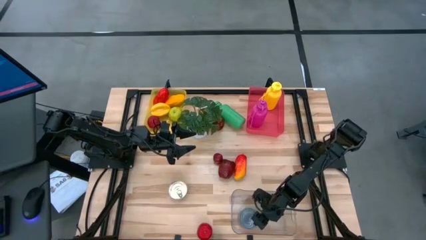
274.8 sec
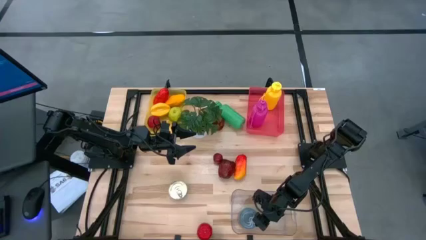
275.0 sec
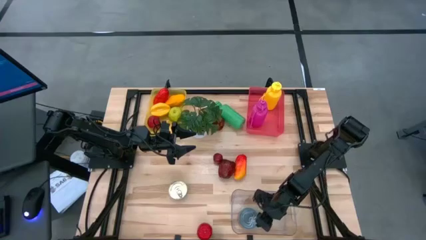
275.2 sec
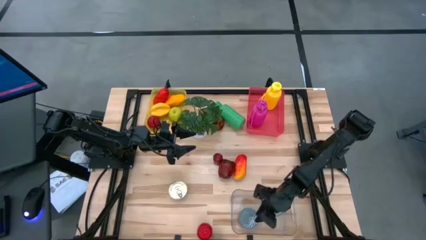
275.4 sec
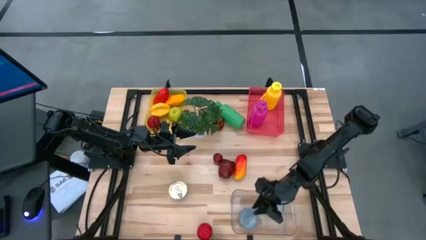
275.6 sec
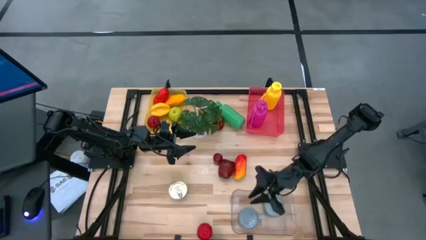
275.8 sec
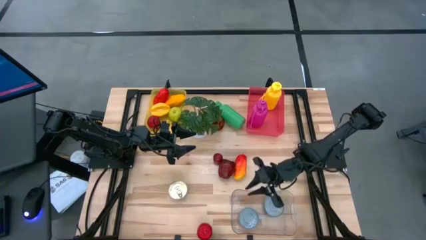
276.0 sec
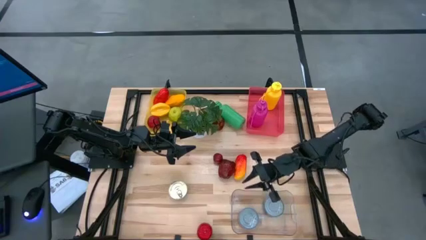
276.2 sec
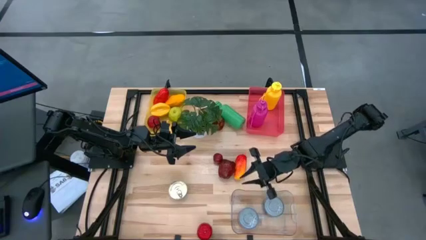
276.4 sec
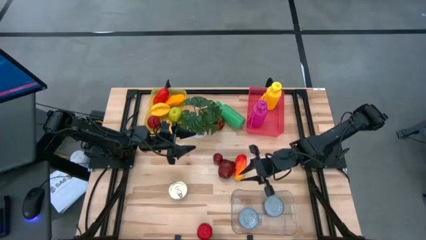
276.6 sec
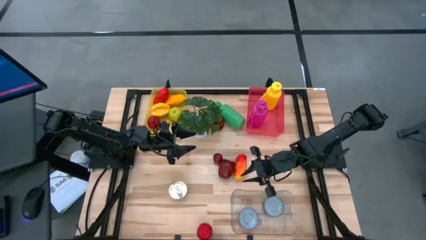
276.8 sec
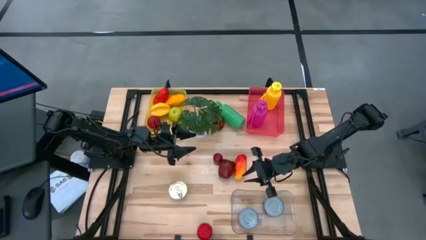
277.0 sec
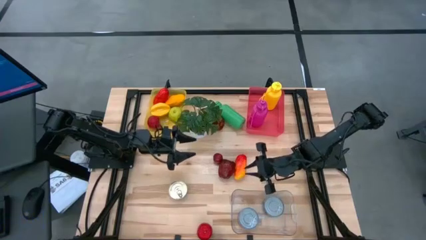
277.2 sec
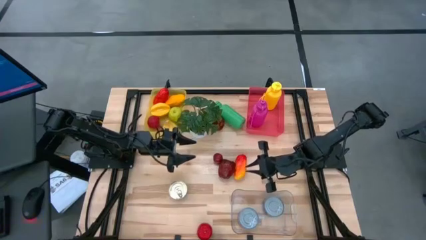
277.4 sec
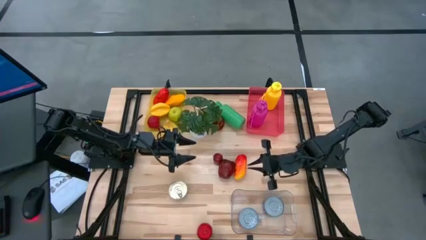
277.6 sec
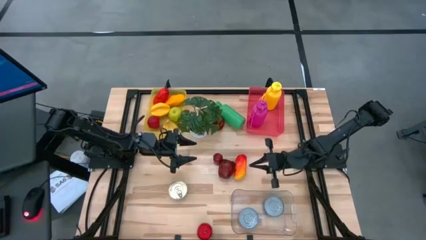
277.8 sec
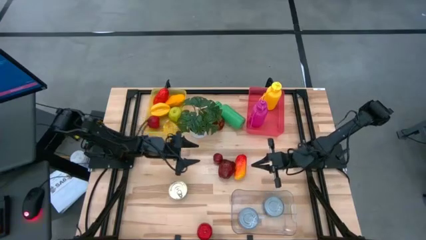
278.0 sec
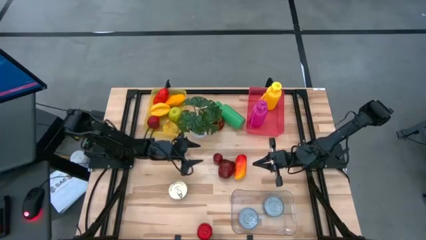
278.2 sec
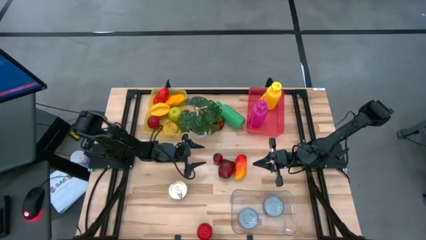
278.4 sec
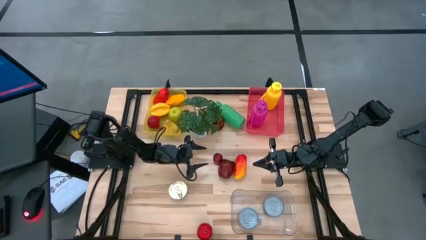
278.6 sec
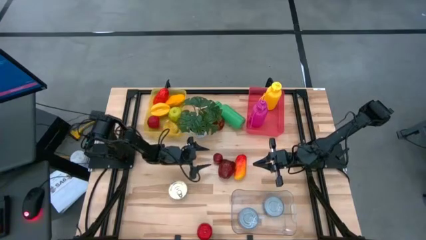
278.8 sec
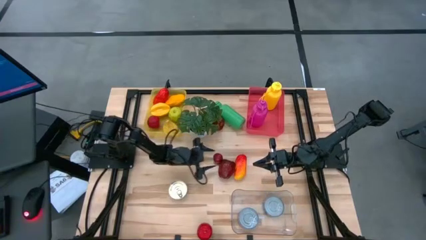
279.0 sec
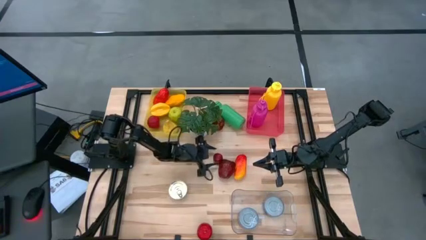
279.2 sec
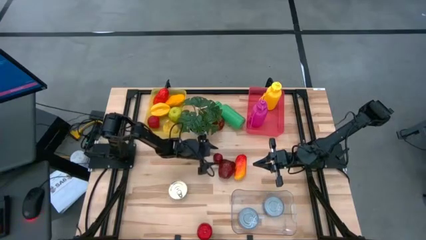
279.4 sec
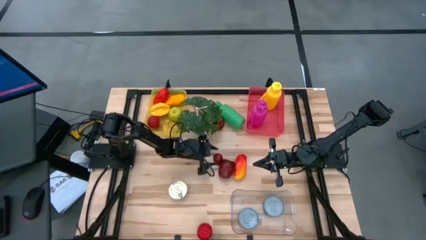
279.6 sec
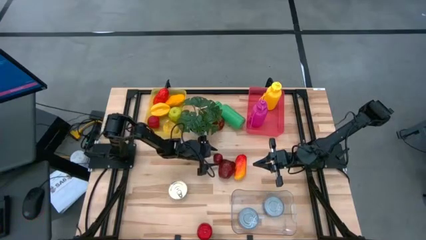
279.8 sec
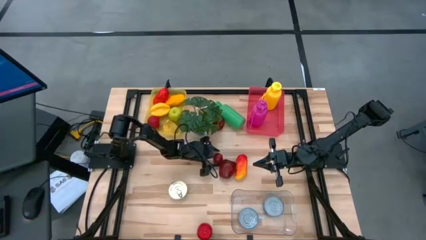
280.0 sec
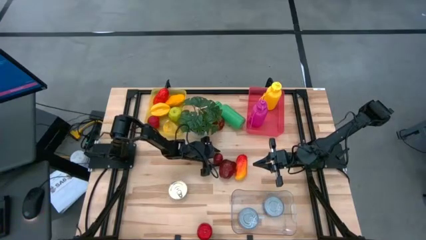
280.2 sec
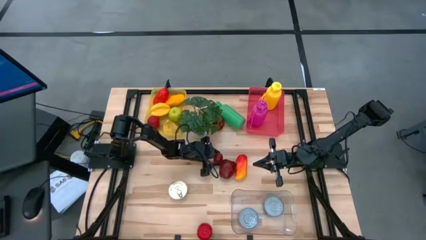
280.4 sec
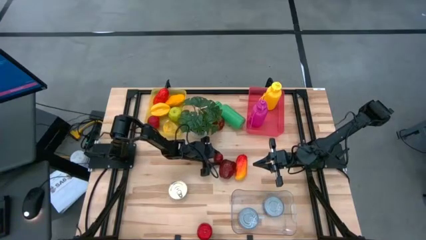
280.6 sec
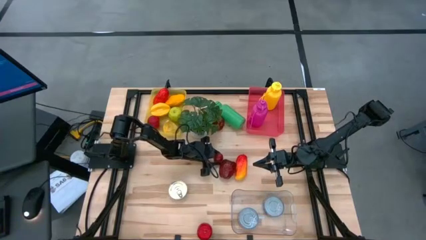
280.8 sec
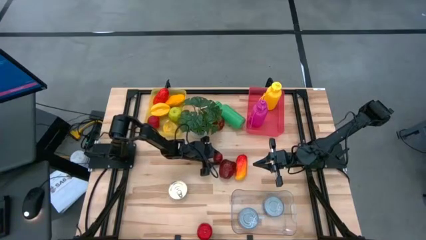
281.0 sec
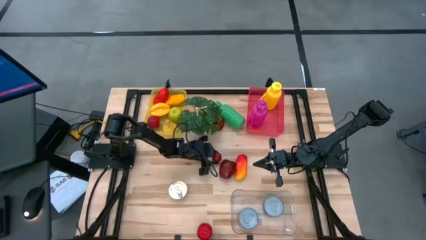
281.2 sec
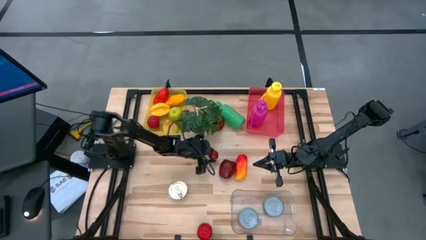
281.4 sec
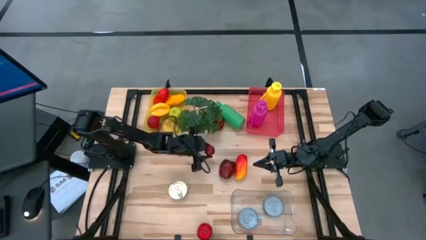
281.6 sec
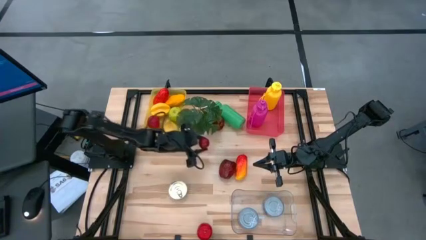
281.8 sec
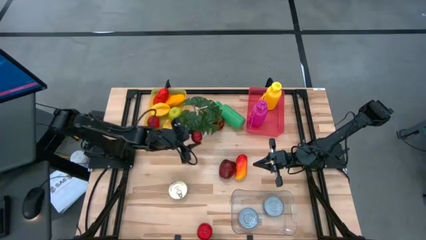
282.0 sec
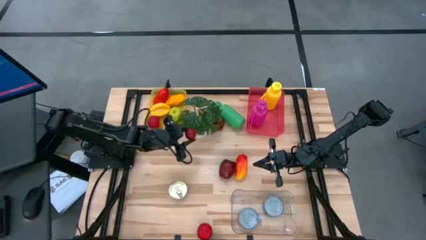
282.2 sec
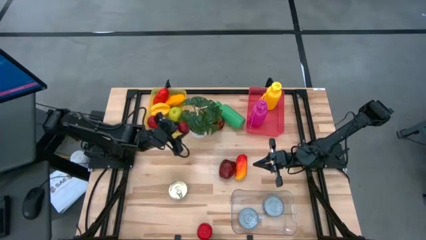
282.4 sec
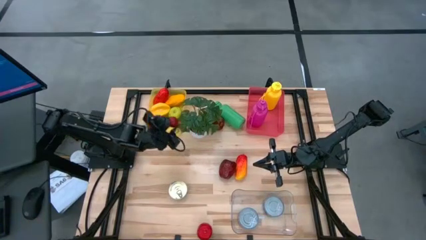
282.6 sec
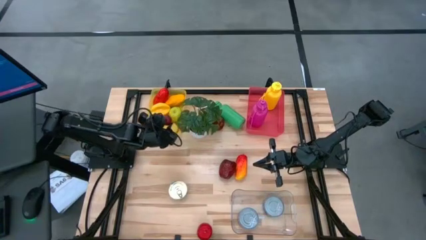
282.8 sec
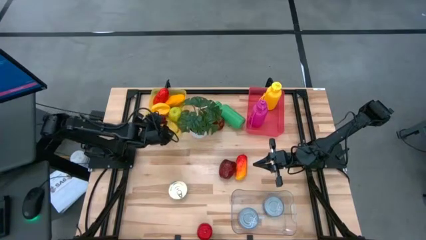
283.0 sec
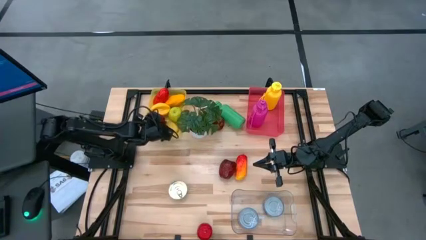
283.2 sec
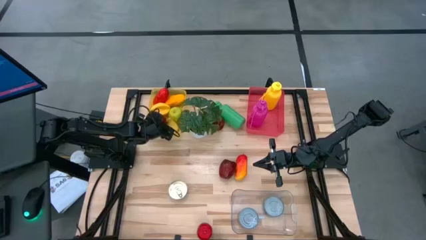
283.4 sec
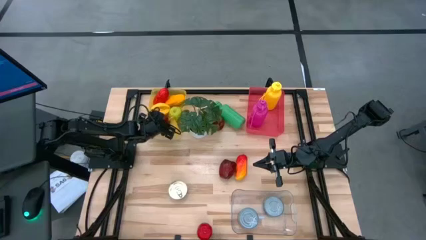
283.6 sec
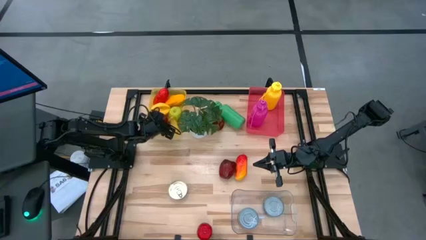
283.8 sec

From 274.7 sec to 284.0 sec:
Task: Pick & Place Food Item
Put the red pomegranate into the yellow bin

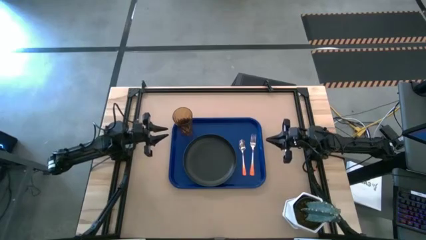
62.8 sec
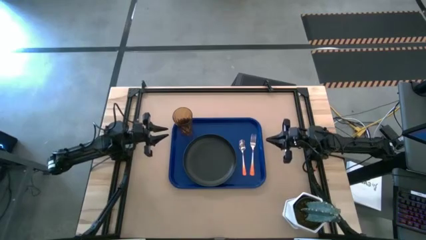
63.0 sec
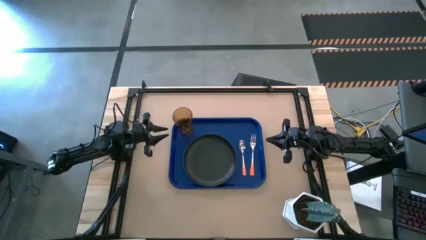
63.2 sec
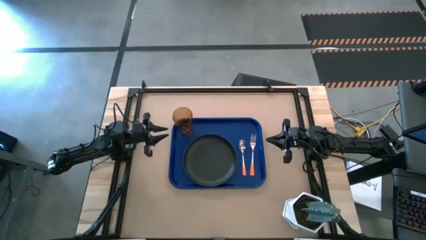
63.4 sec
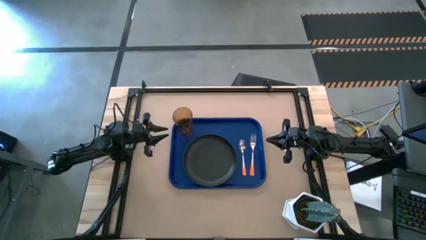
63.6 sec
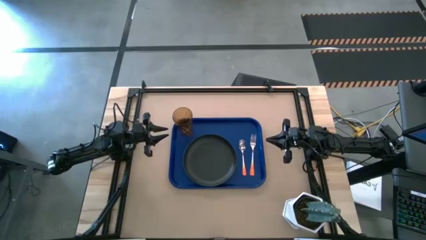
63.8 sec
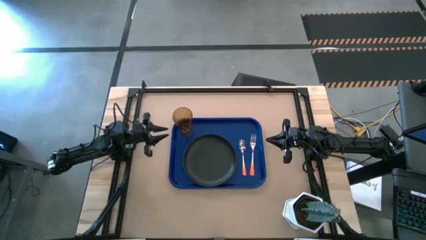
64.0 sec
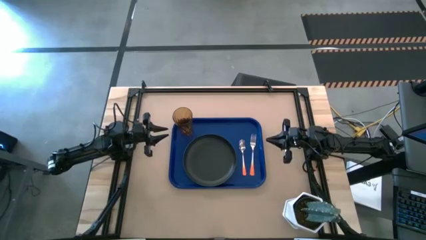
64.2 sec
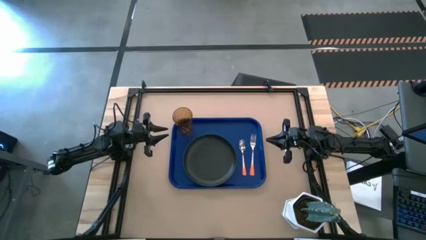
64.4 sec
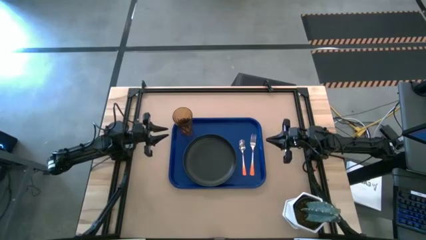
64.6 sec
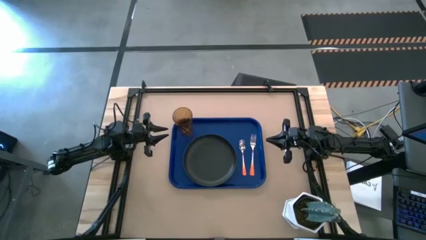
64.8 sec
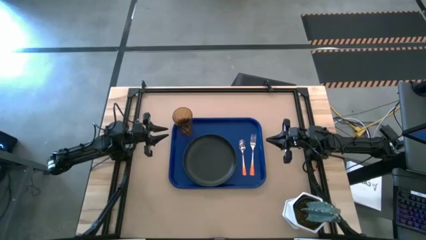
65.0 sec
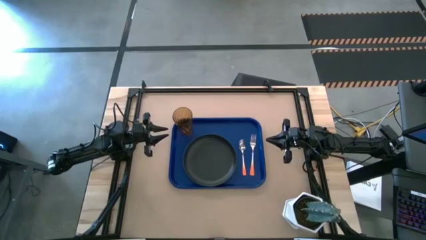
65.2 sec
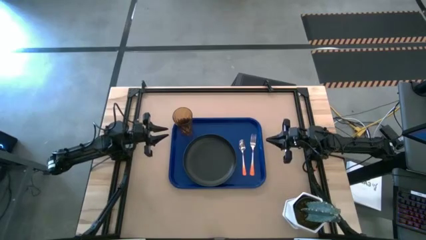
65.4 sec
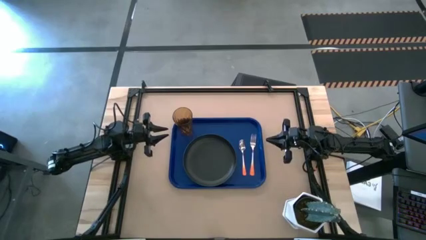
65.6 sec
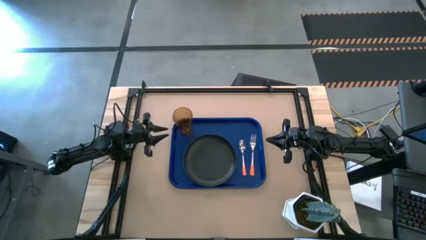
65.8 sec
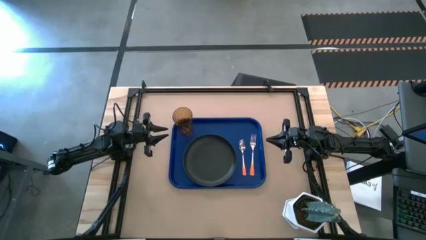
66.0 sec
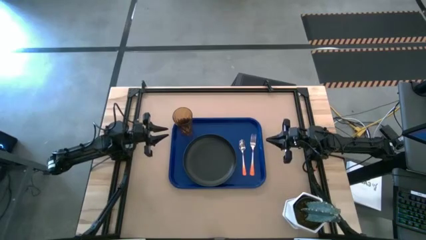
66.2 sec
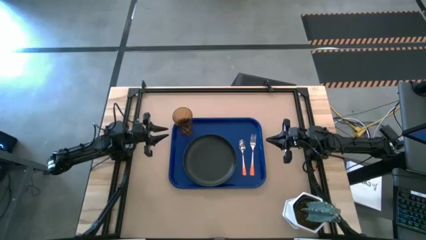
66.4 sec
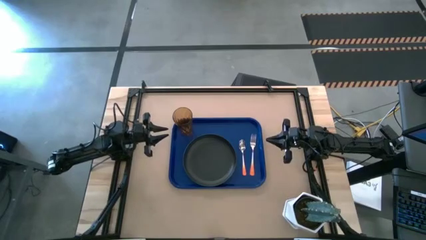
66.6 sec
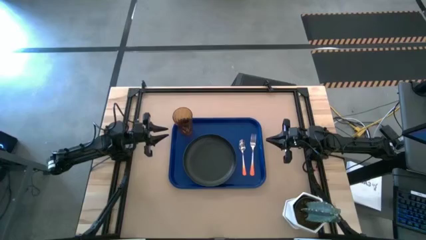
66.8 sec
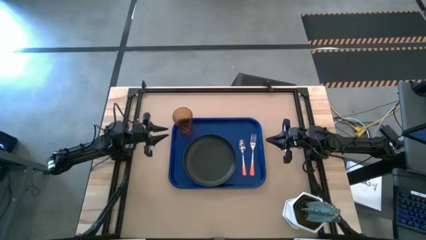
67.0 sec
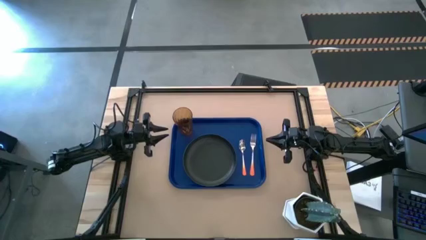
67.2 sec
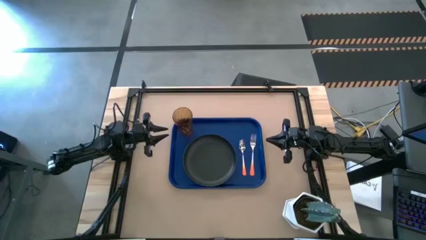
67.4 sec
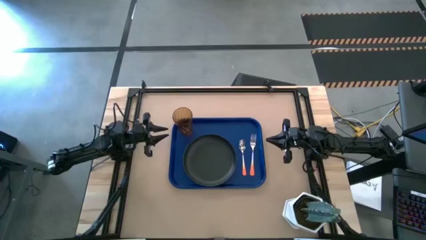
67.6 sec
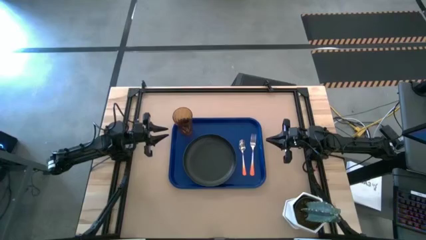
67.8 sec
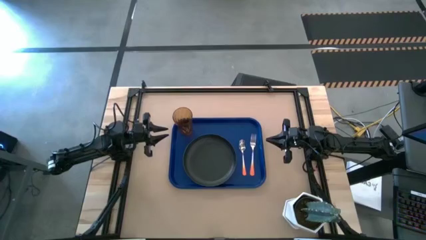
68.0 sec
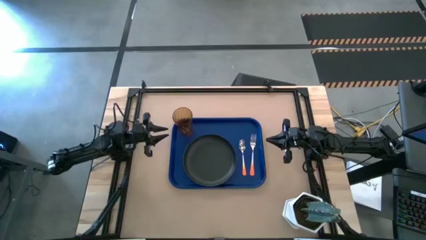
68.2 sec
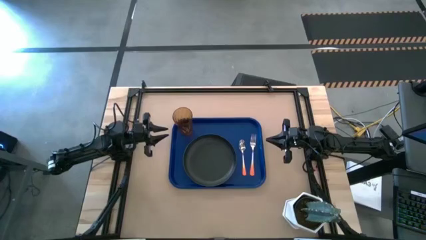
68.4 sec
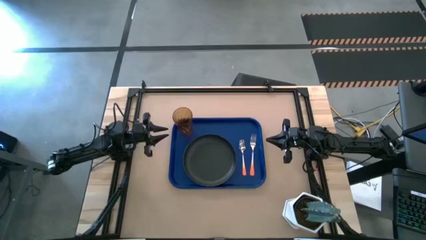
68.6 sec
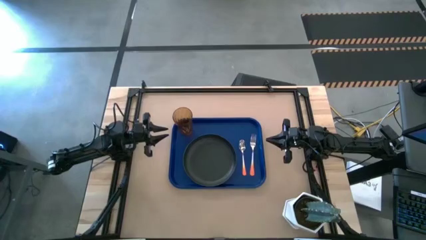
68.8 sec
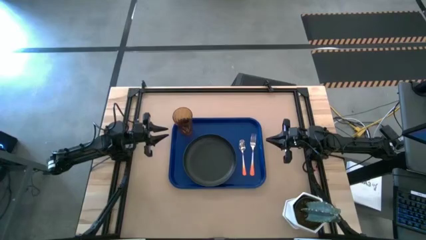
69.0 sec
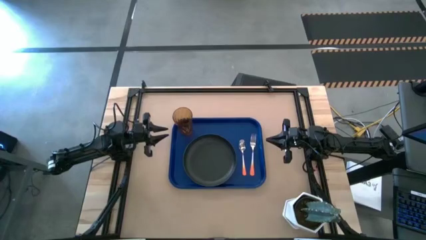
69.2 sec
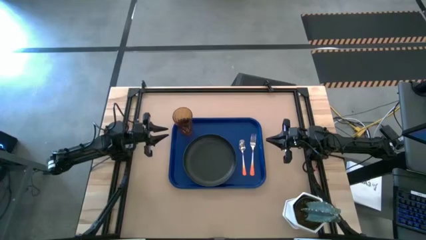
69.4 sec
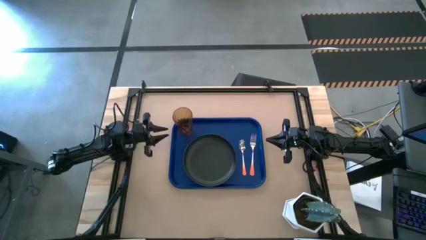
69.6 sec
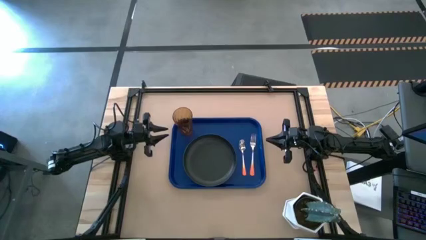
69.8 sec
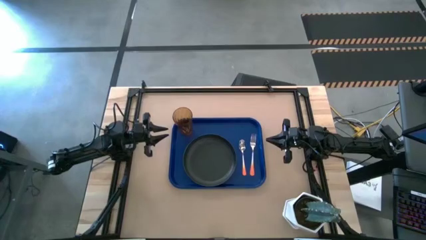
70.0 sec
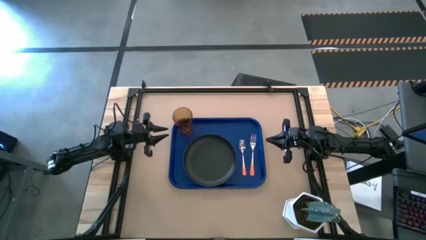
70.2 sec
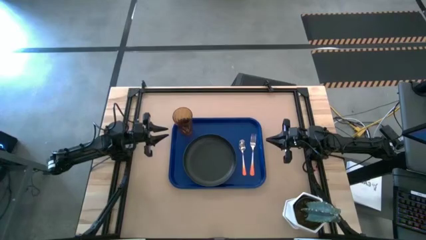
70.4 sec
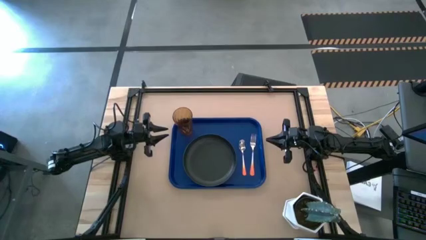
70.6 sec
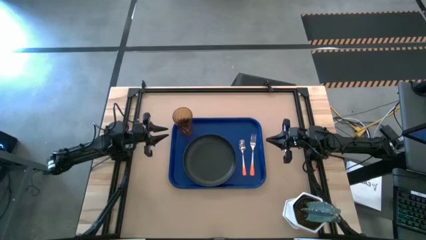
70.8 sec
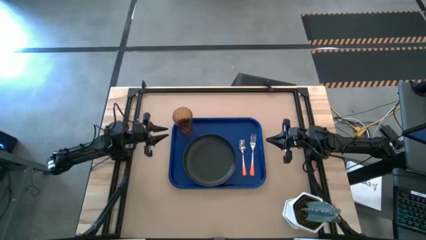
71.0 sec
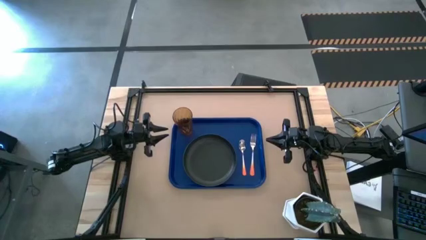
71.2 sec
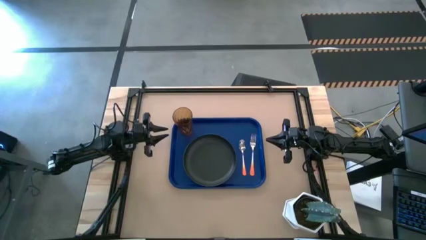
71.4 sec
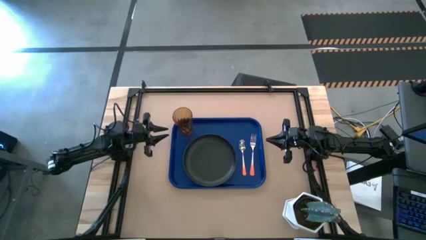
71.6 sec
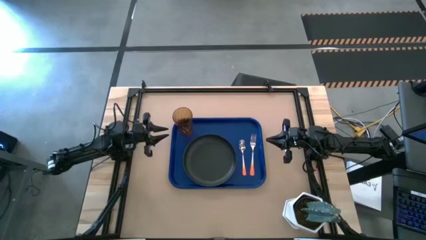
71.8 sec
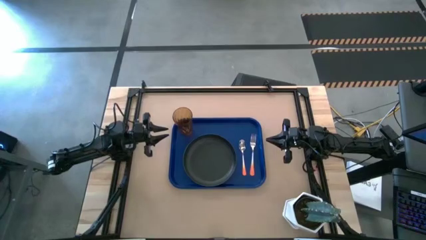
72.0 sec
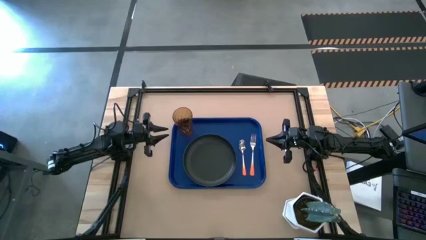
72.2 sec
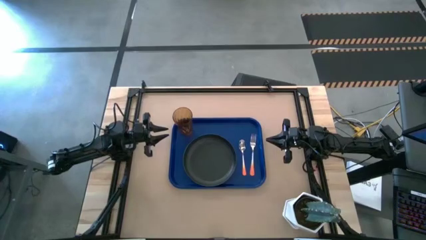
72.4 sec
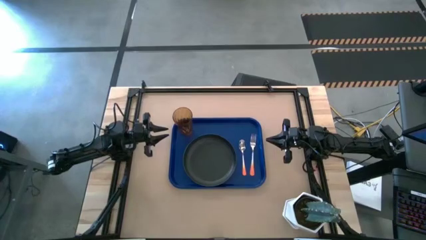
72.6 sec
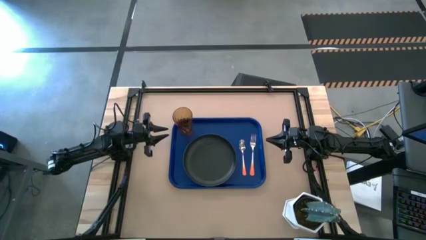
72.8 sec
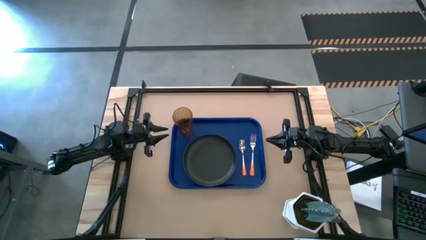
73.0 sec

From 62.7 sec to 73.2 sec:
Task: Pick and place plate/cup/fork/spoon on tray
Return to Home Position
